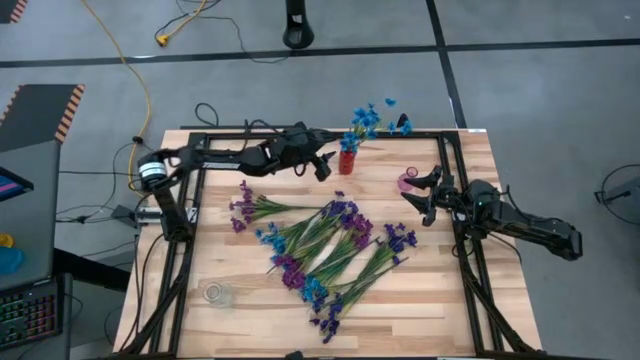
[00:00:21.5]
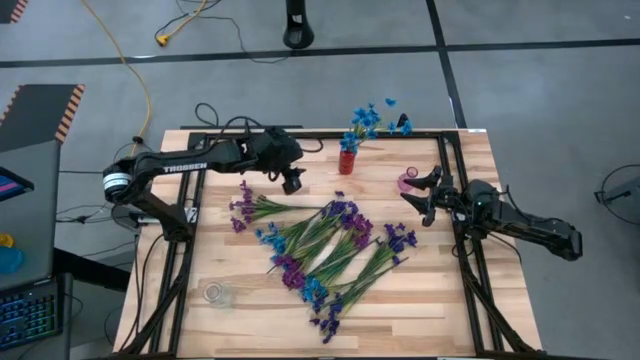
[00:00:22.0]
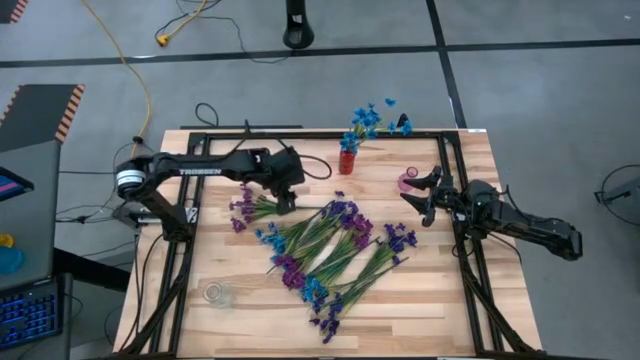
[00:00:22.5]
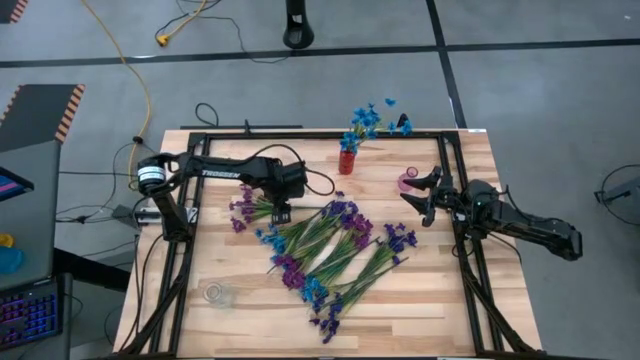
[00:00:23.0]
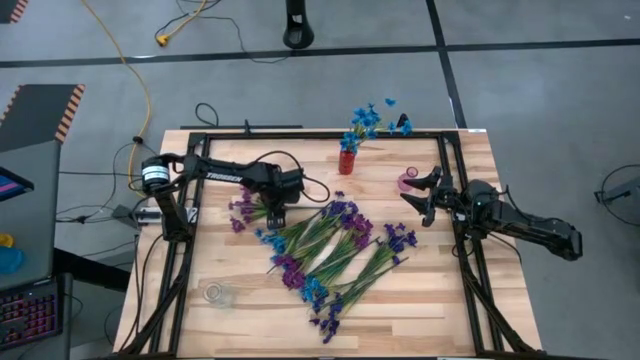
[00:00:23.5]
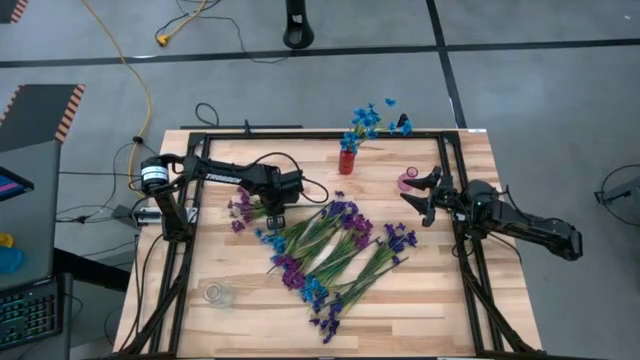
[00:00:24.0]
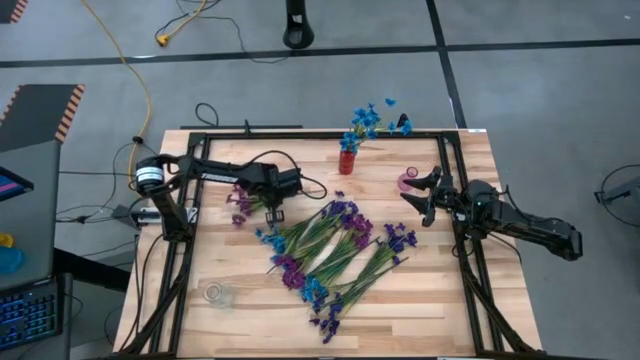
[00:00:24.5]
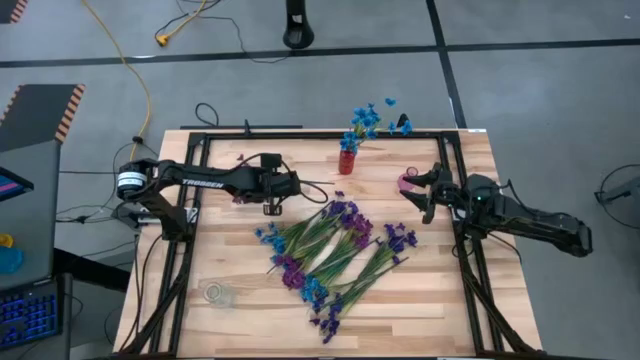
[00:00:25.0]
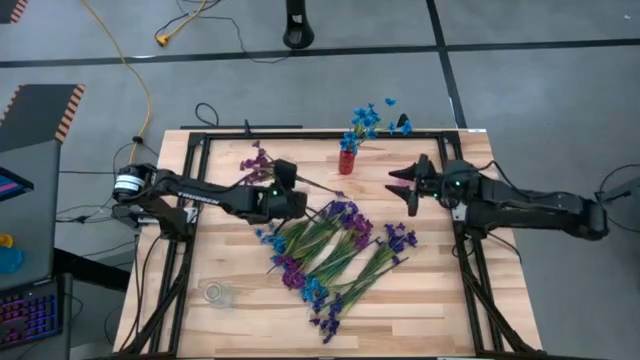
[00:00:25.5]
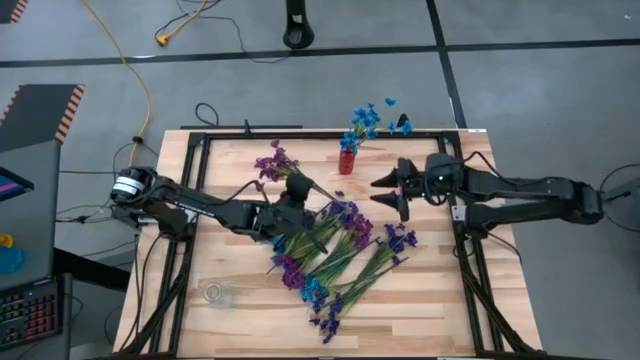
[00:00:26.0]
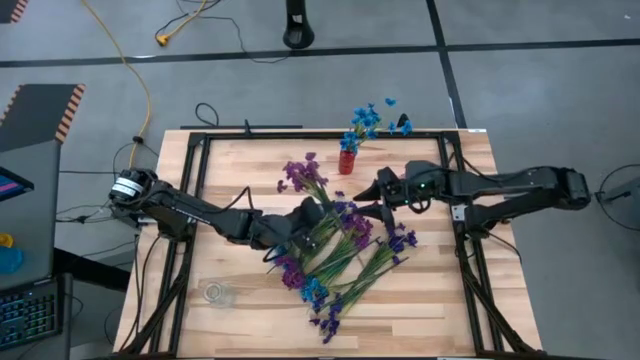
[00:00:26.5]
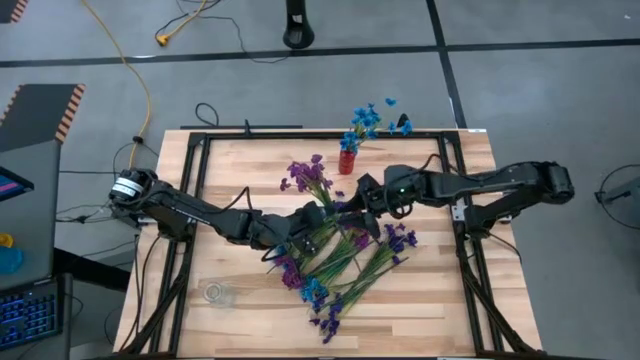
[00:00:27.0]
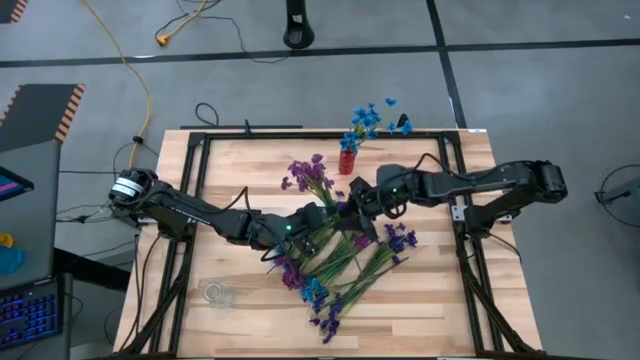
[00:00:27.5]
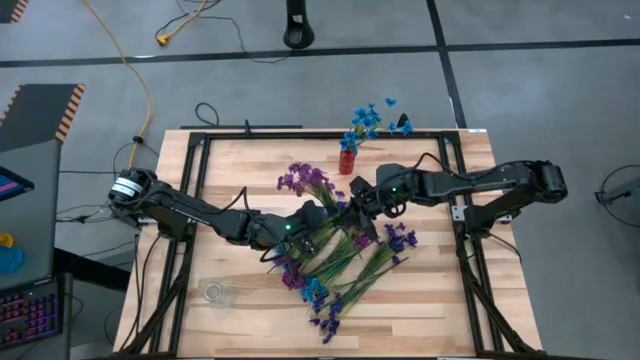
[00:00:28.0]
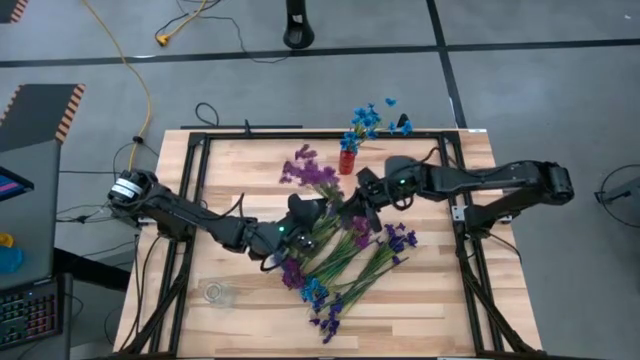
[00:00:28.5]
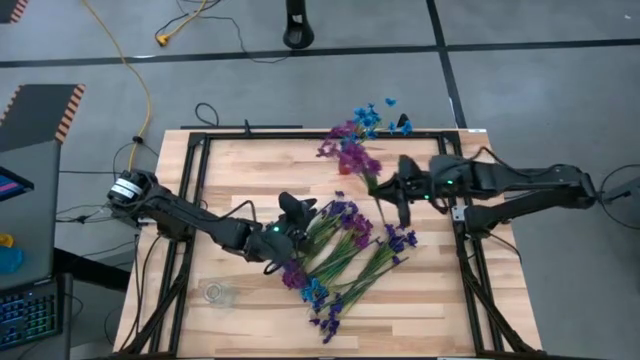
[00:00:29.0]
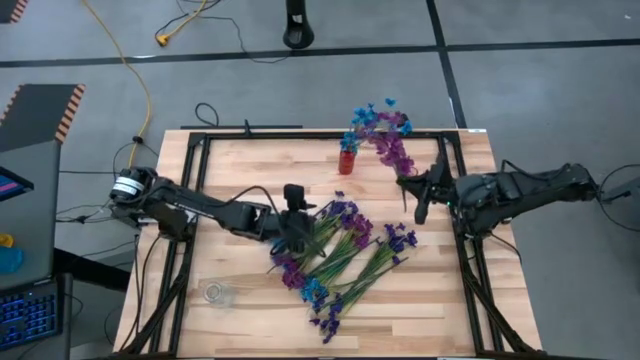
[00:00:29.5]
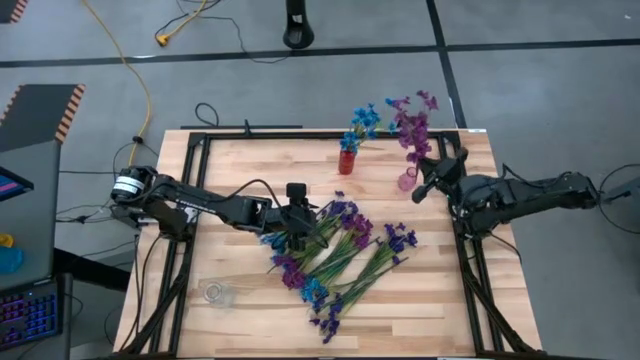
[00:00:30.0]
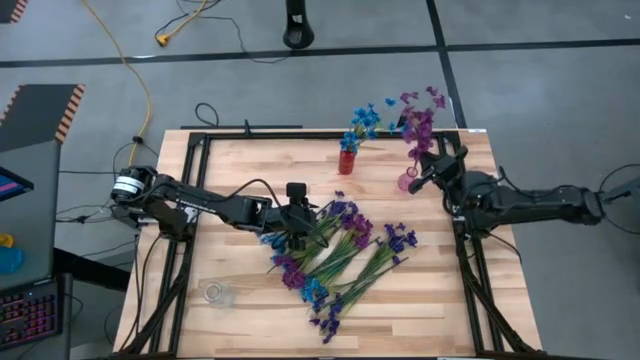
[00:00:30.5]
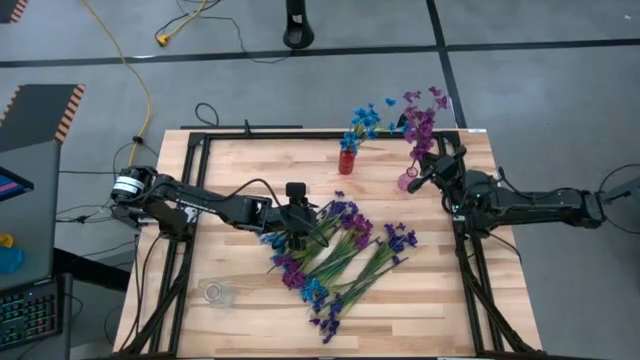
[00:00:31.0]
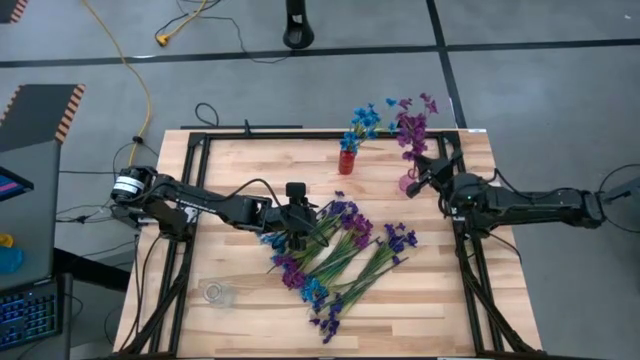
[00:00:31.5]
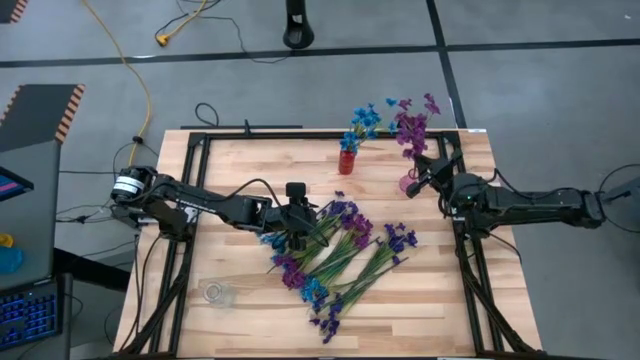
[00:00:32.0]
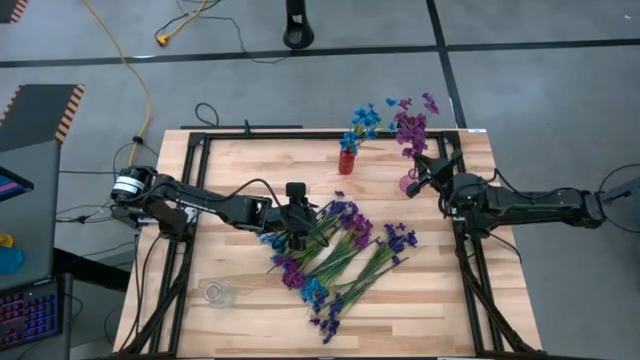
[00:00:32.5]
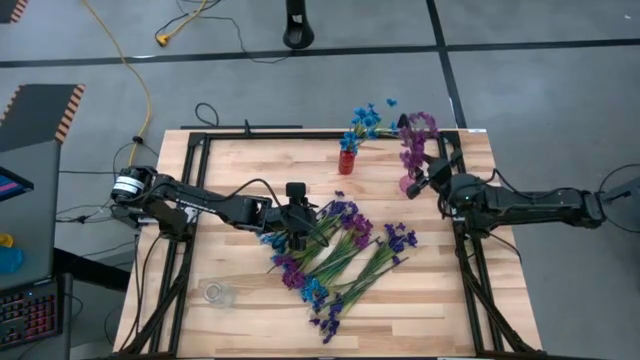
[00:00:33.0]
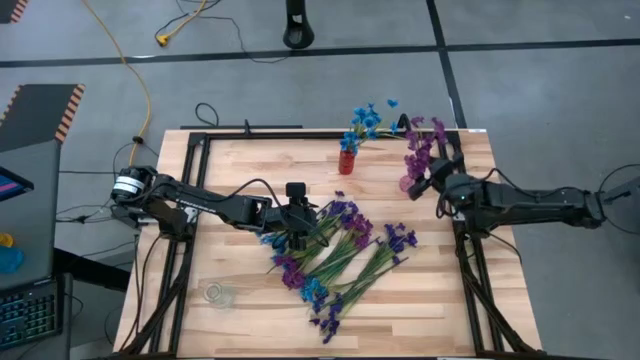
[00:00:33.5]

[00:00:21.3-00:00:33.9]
Task: Sort flowers into vase by color
Put the top violet flowers into the violet vase

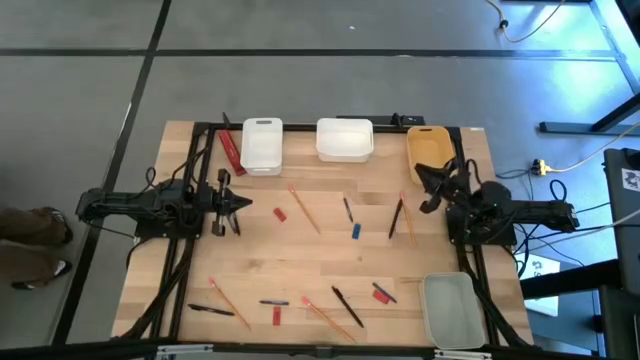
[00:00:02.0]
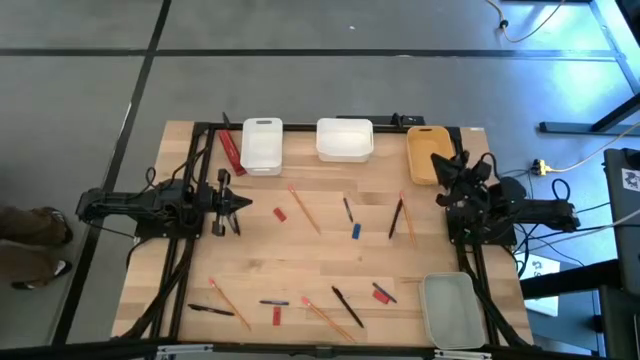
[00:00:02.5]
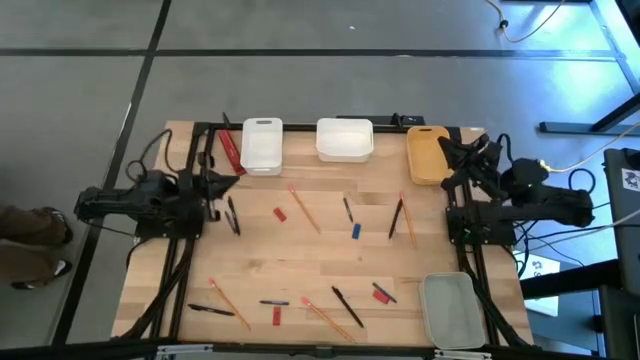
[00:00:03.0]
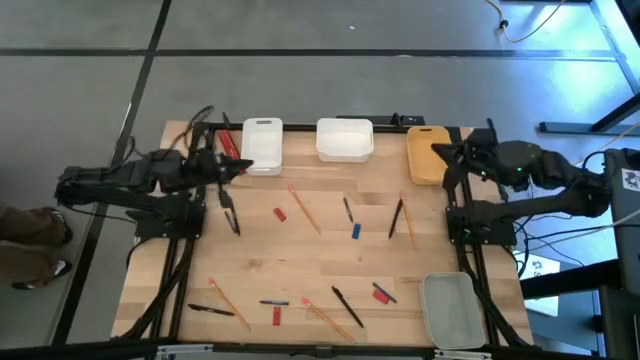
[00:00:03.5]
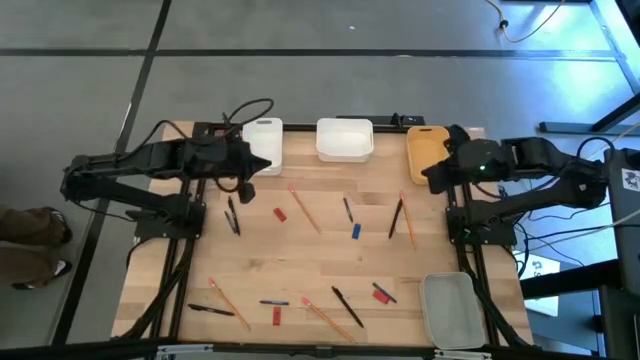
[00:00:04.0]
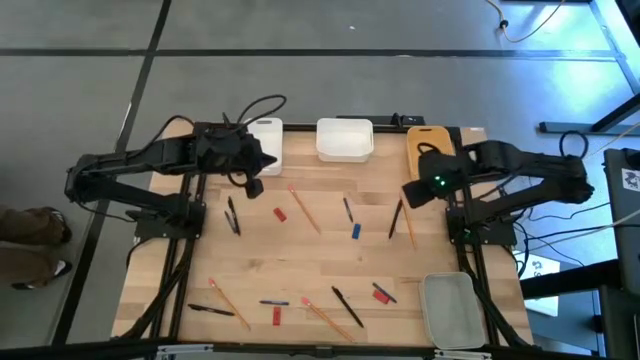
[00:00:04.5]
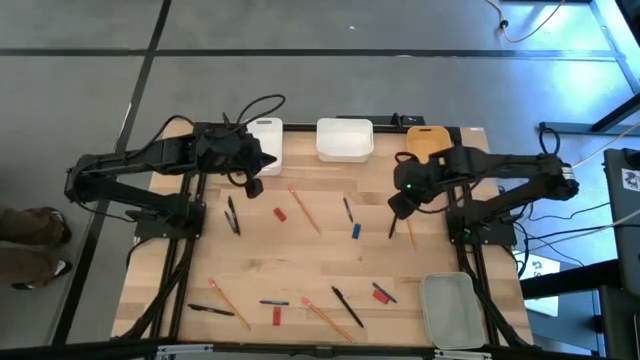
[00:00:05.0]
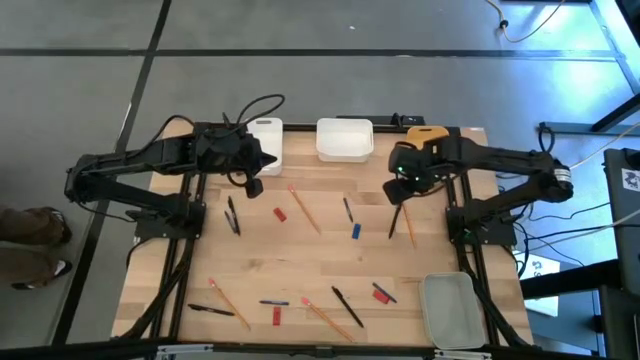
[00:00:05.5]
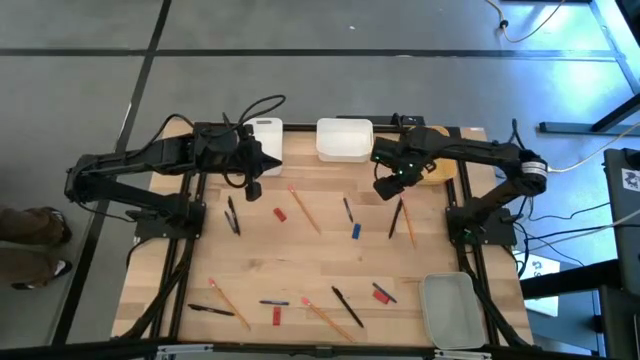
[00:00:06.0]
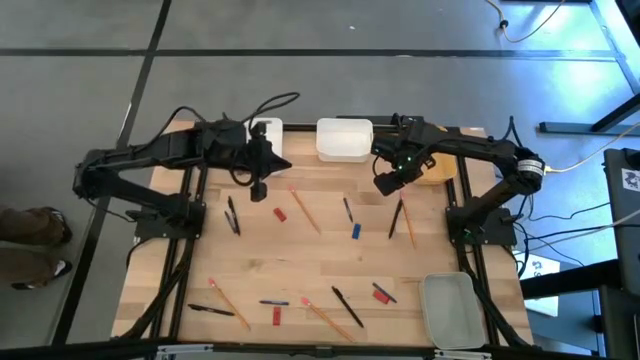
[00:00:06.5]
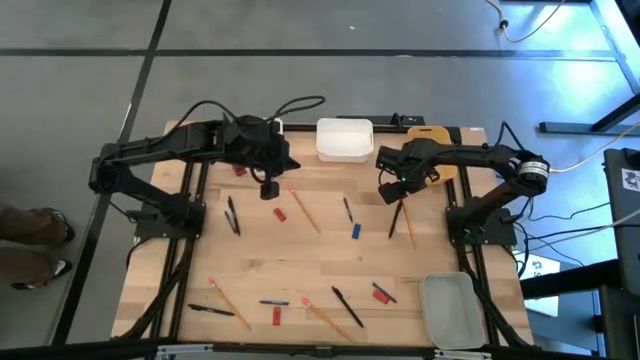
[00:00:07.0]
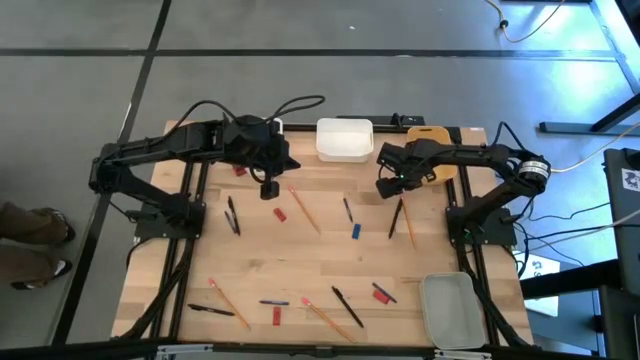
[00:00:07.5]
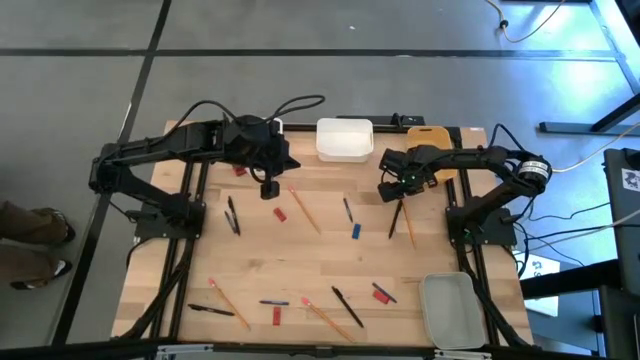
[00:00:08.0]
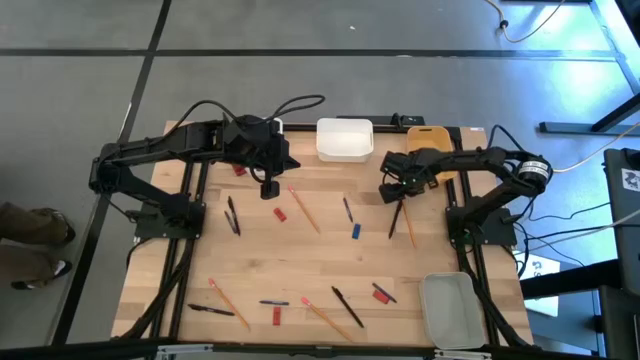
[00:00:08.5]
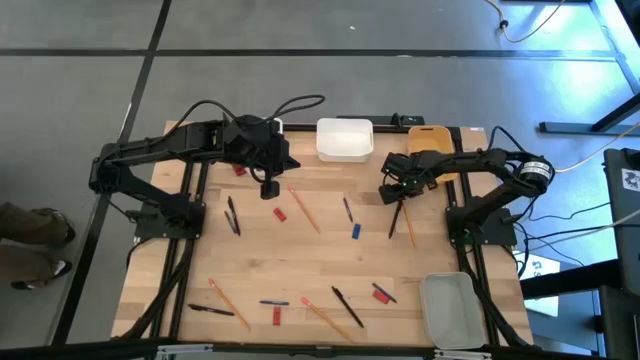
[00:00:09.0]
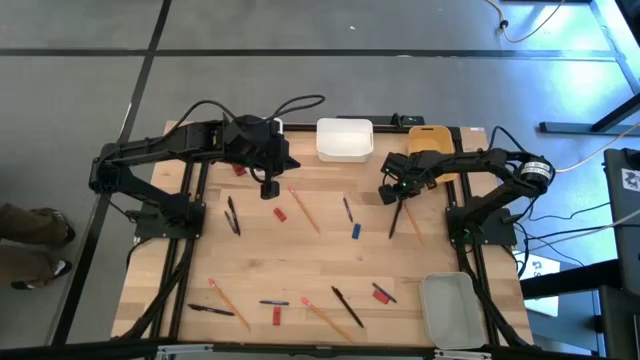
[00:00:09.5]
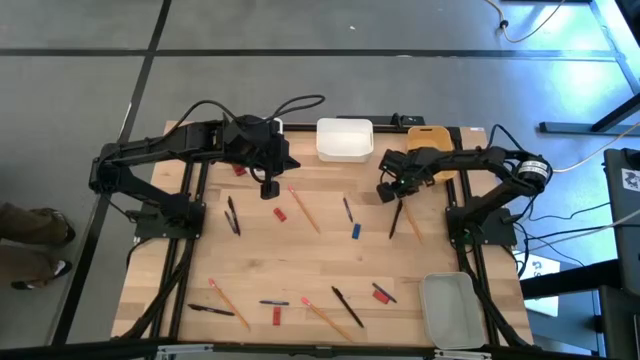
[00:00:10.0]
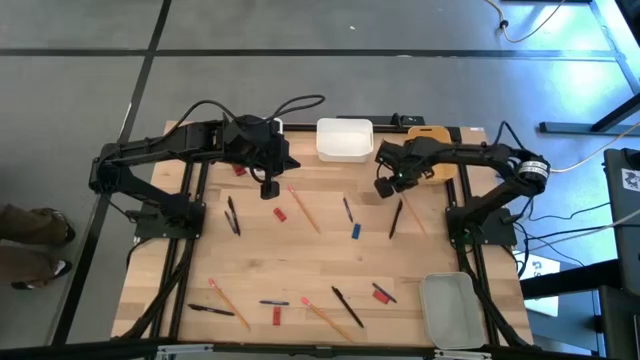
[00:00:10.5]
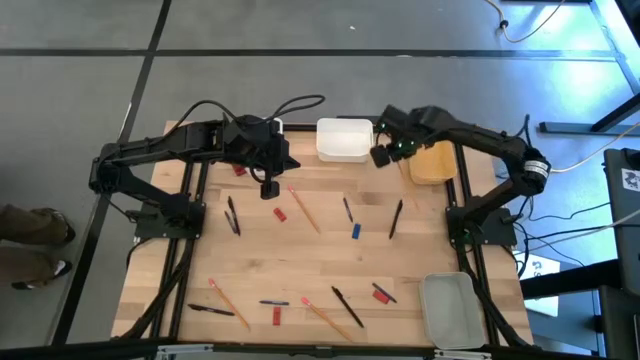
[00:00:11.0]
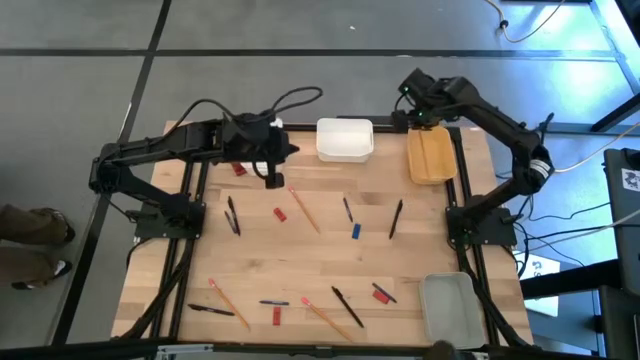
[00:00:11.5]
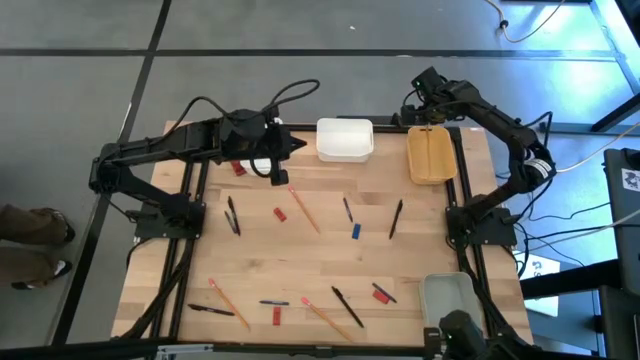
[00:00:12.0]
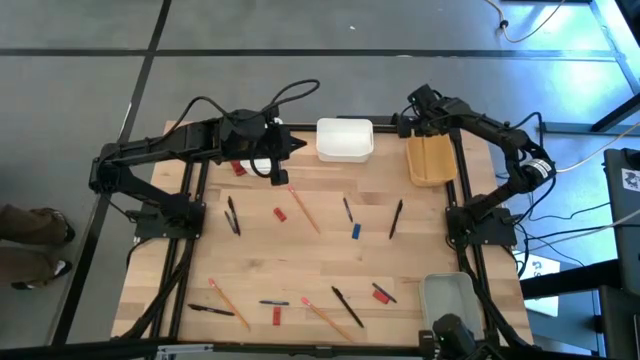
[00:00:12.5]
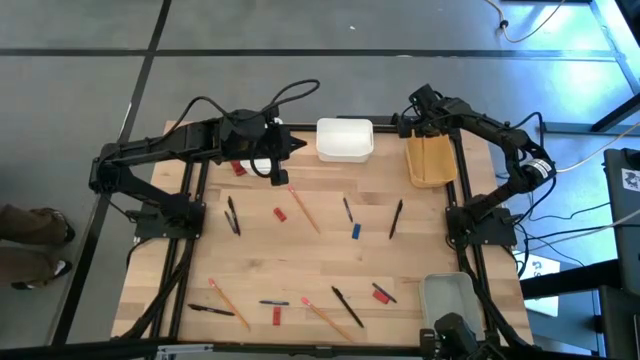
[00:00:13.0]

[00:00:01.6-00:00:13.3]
Task: Sort crayons/erasers/pens/pencils in bins
Put the yellow pencil into the yellow bin
